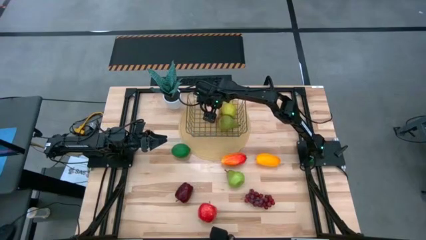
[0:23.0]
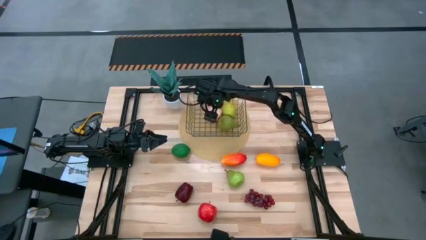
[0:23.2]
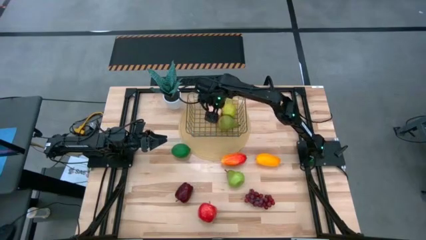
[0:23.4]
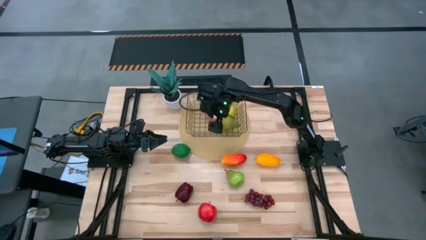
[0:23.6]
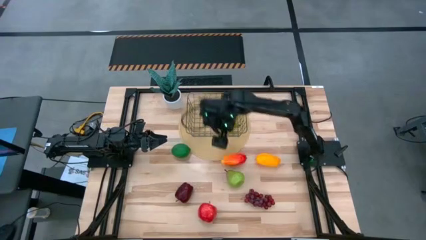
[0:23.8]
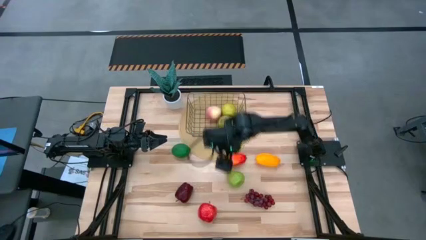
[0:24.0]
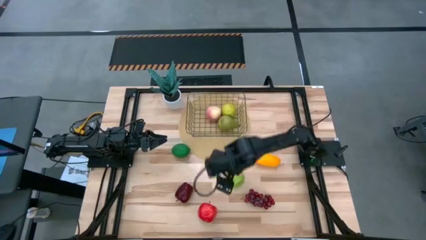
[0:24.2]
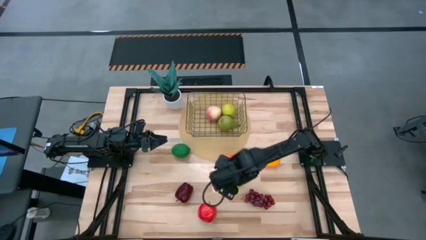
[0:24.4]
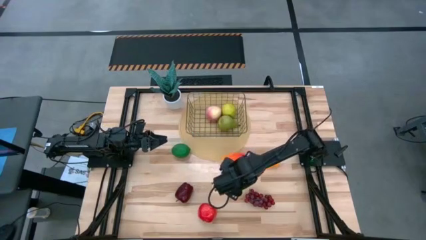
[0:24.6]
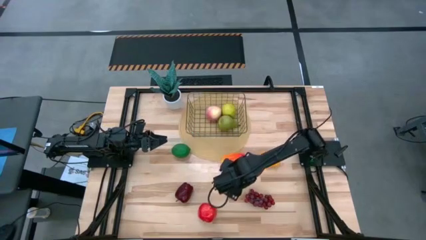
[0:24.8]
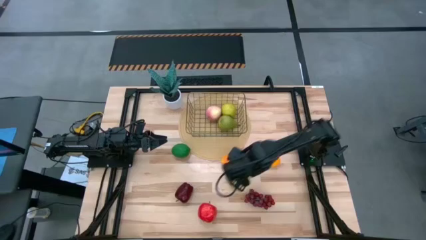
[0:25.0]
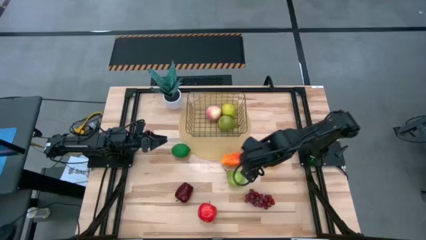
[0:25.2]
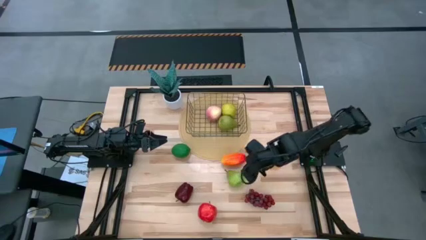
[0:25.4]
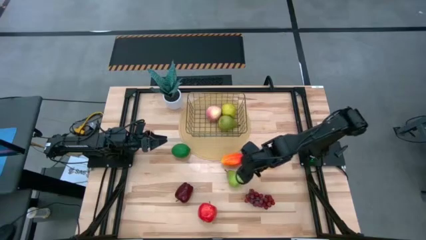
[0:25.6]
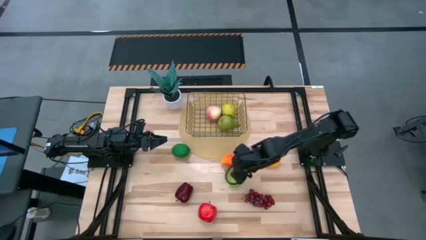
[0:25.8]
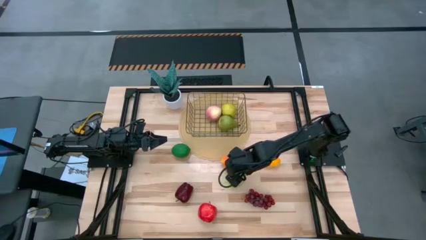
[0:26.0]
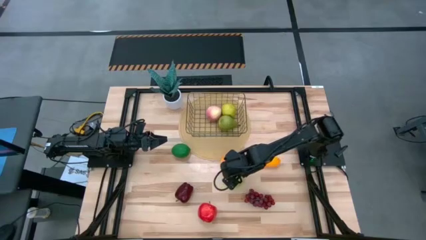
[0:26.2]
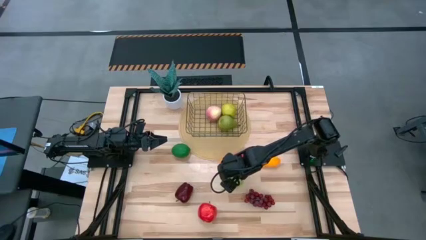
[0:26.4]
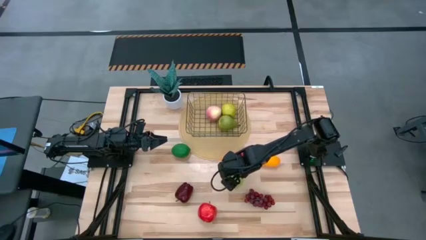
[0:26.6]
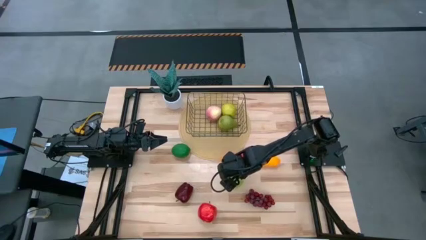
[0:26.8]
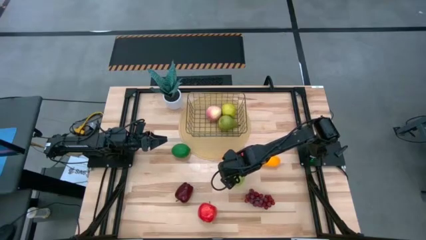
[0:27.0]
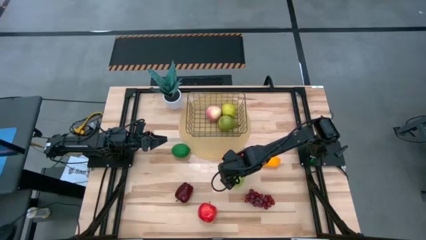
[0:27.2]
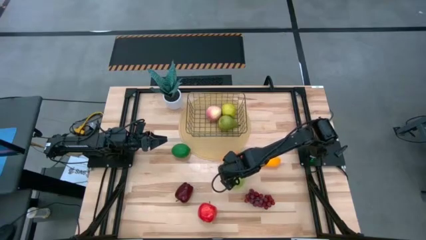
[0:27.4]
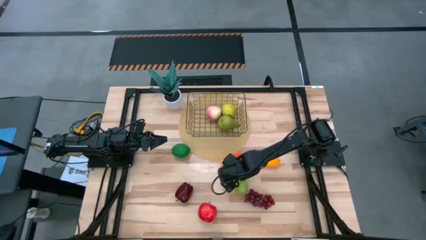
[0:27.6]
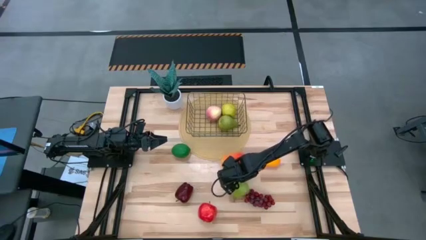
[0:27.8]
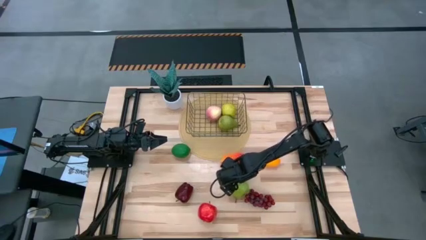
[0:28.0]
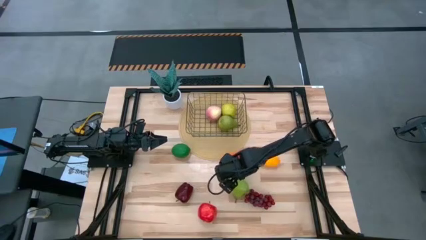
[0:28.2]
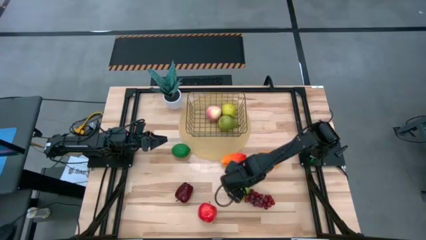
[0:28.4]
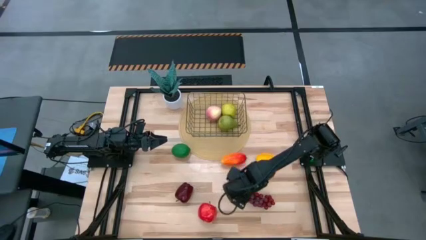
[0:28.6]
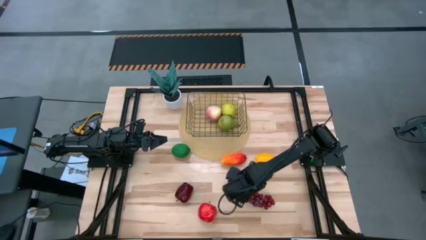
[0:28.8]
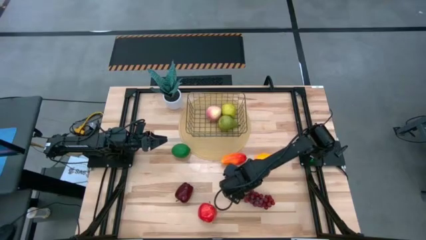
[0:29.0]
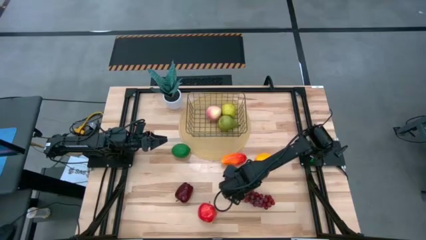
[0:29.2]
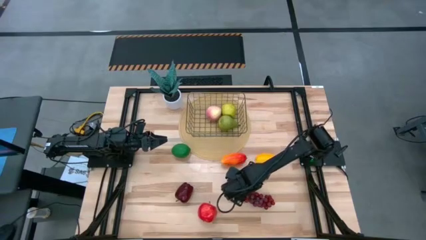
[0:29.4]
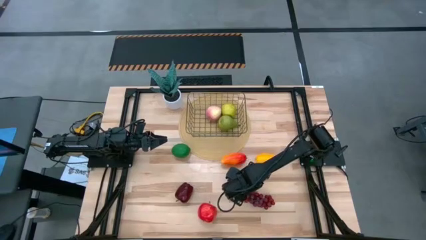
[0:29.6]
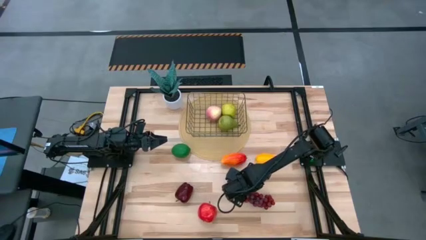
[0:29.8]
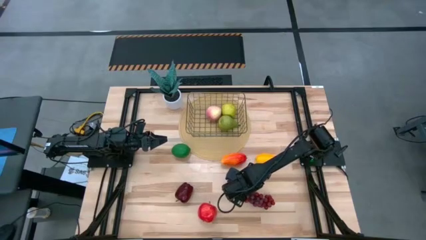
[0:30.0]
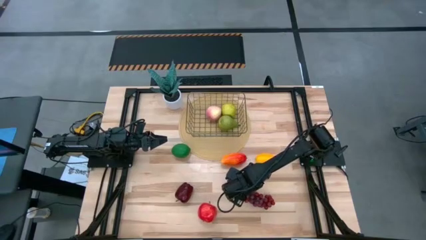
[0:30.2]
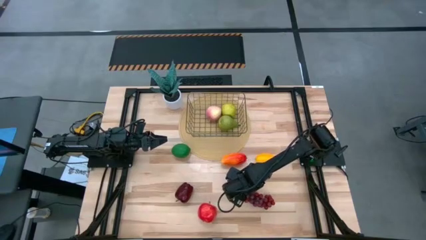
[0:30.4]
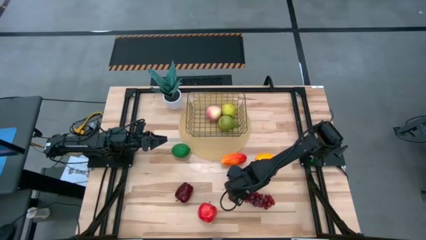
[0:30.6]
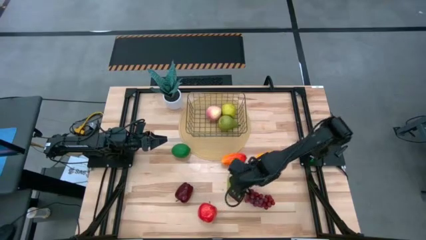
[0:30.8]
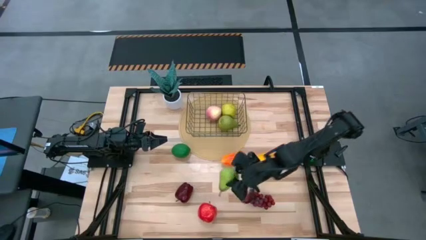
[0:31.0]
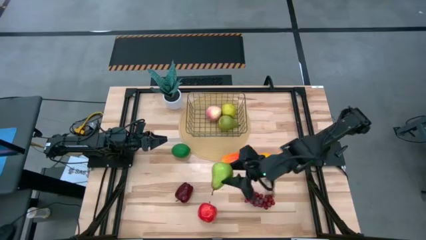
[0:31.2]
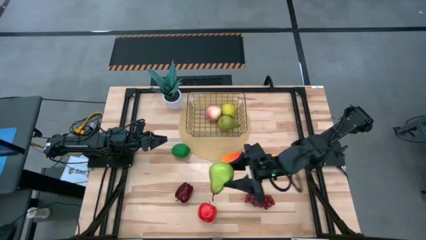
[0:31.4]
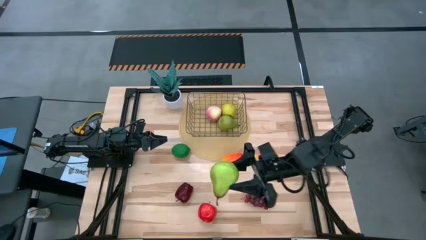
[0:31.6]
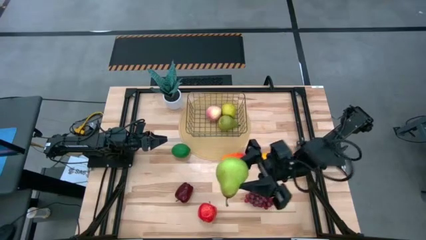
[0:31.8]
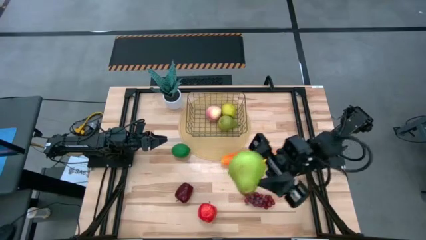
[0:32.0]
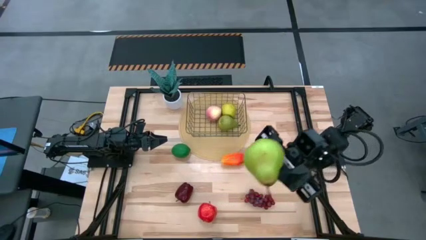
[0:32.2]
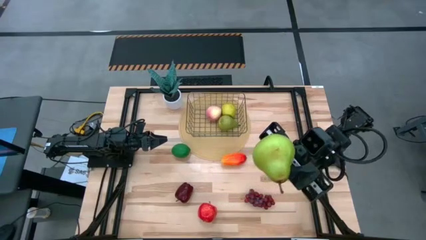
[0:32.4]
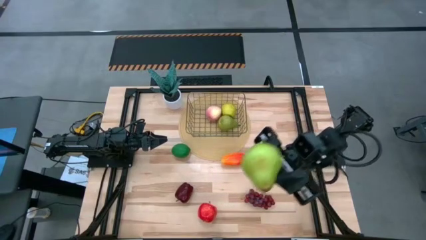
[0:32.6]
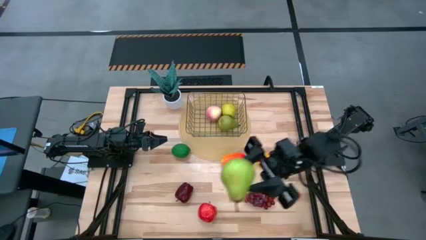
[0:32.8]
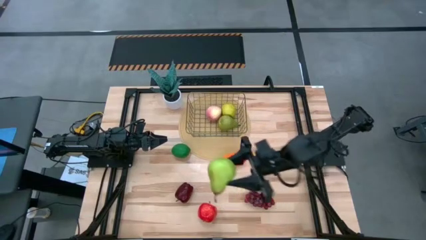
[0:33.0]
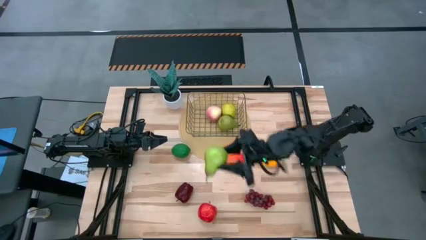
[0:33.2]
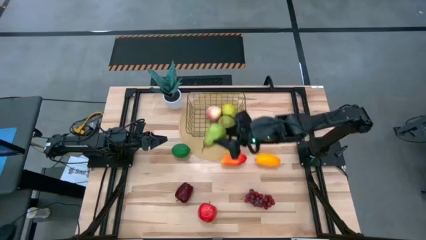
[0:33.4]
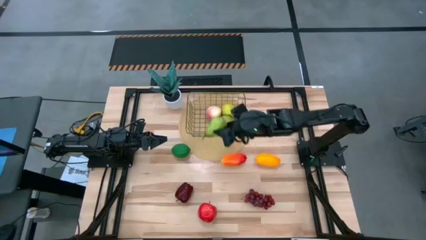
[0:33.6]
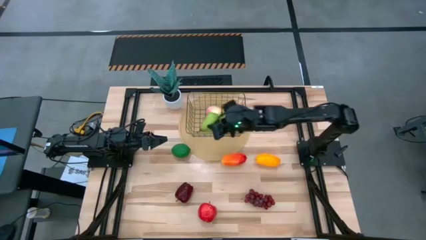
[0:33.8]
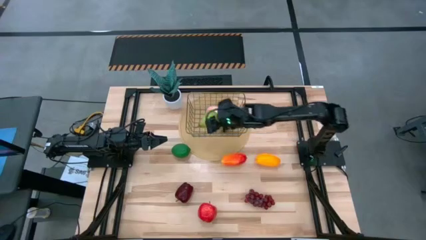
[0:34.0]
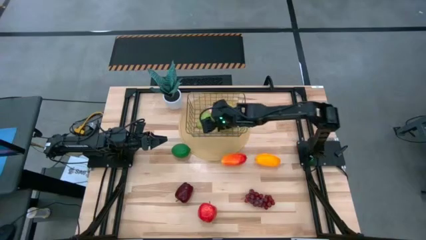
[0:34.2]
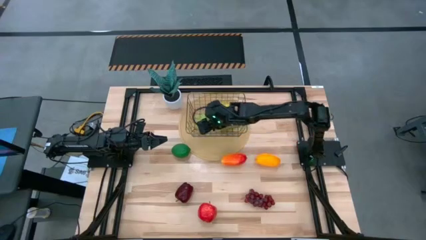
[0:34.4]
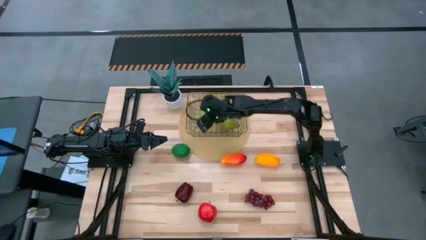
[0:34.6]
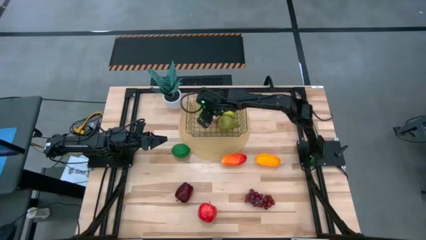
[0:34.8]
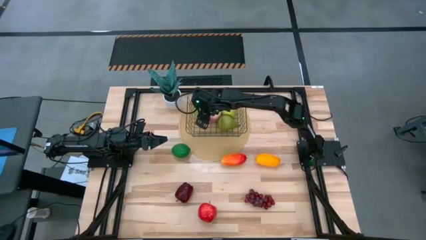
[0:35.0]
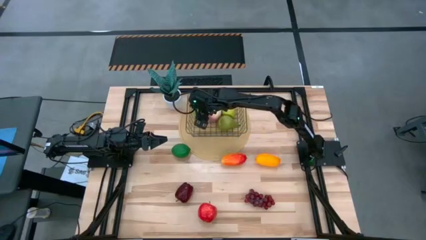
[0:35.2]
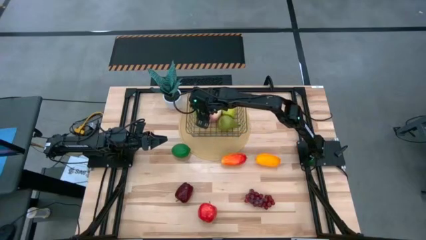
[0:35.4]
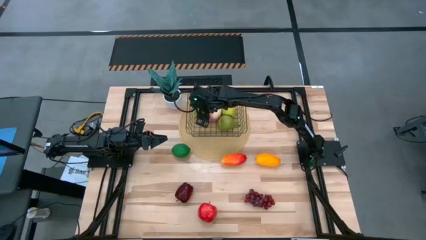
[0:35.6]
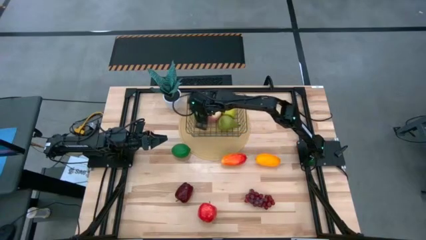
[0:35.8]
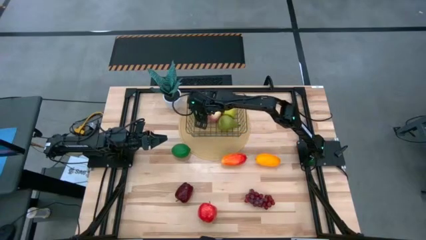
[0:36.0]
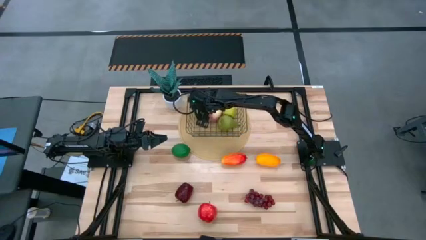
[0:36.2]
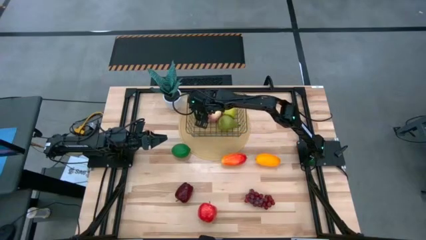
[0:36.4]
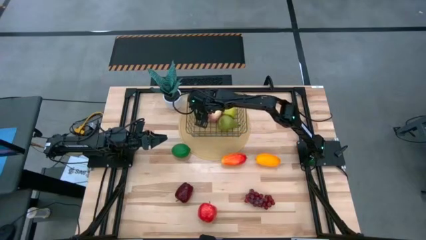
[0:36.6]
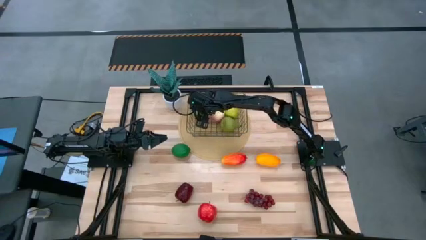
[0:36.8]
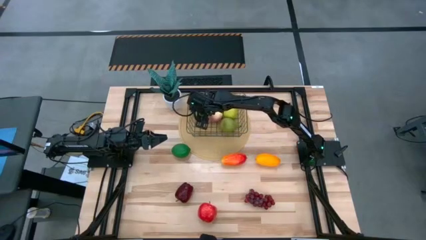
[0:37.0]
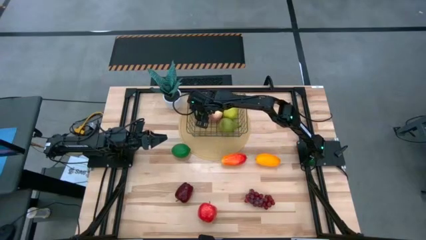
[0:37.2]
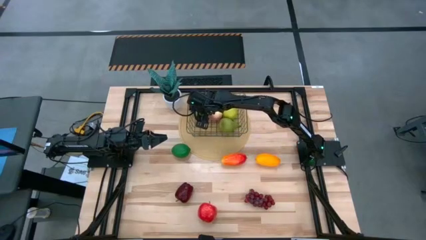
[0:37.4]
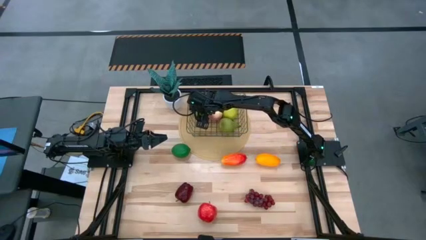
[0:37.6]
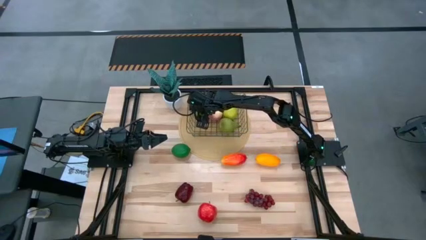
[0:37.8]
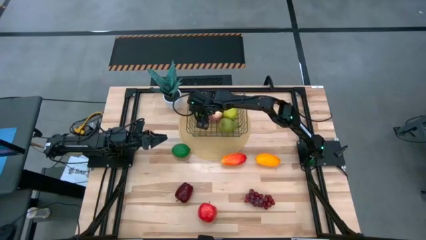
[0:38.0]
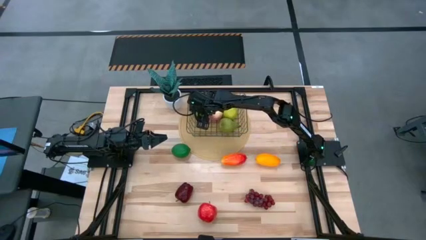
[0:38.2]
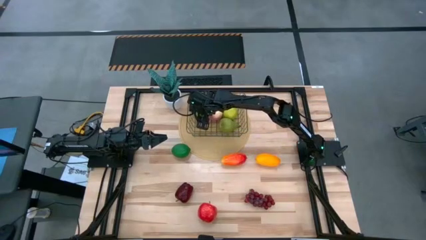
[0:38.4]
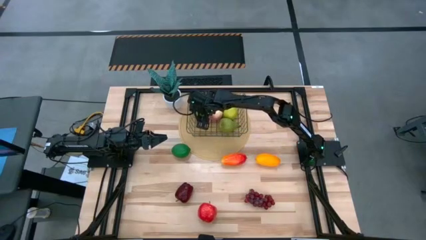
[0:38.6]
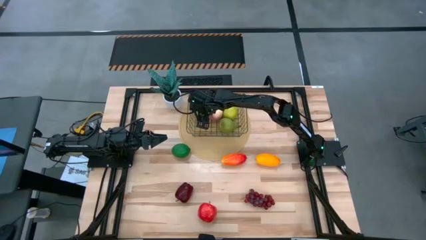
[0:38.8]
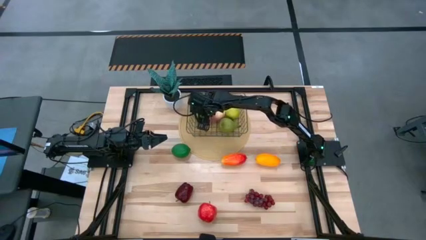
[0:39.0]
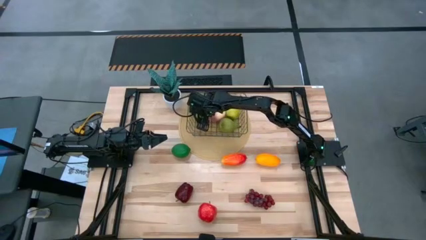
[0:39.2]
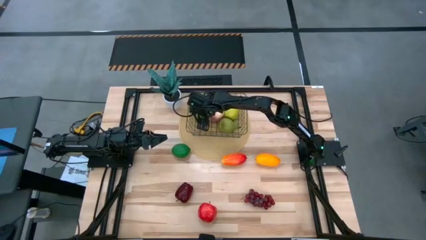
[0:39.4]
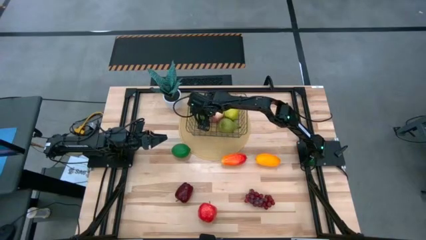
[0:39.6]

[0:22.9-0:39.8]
Task: Build produce basket
Put the green pear into the wire basket

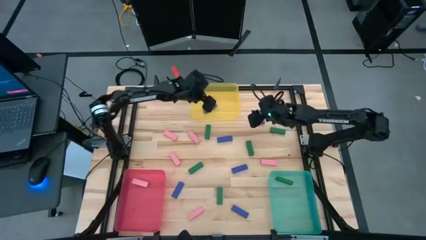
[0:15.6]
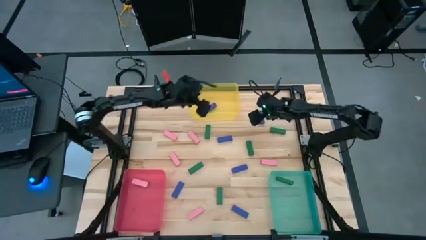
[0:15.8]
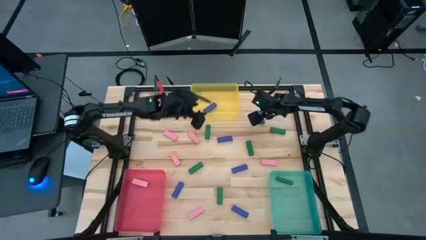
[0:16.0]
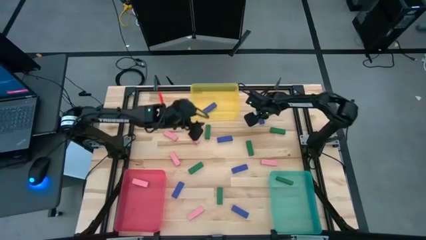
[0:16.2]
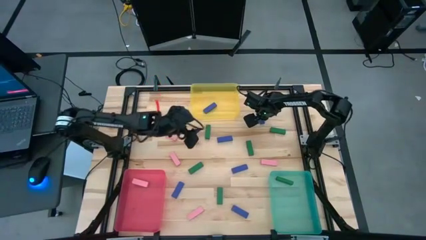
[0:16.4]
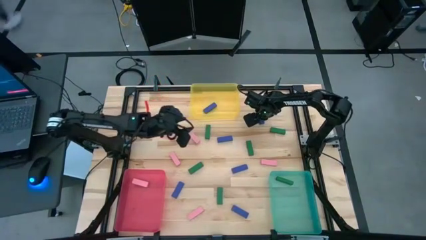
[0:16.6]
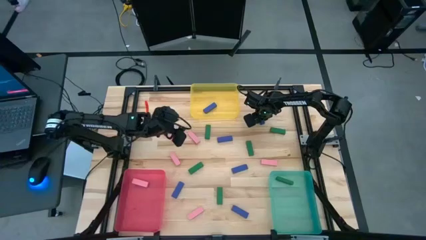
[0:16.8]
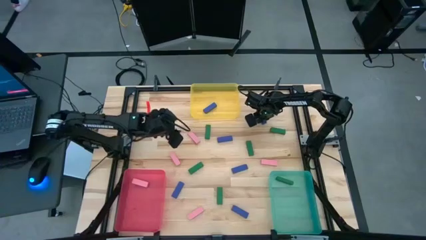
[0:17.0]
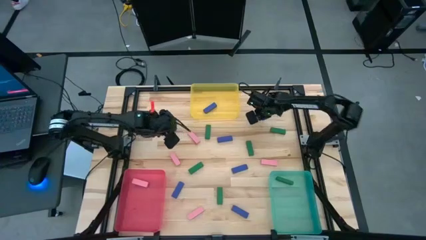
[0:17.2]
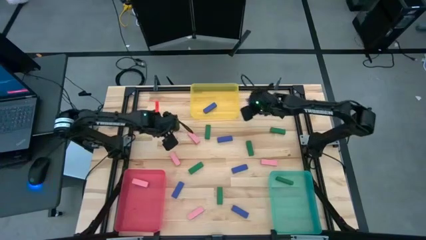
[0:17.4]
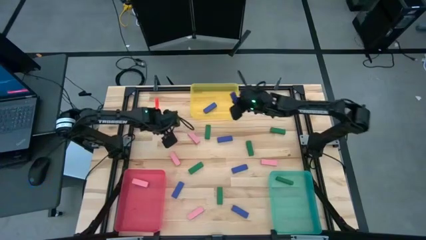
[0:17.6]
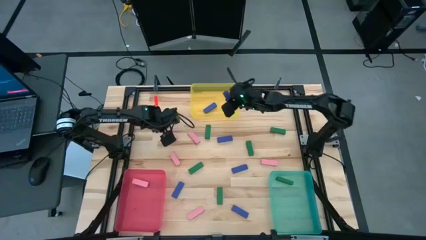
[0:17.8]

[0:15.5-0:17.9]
Task: Sort blocks
Put the blue block into the yellow bin
